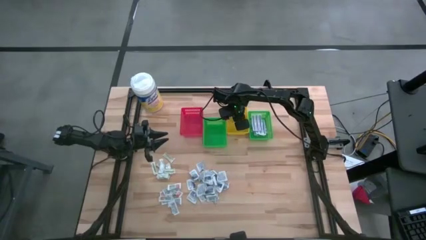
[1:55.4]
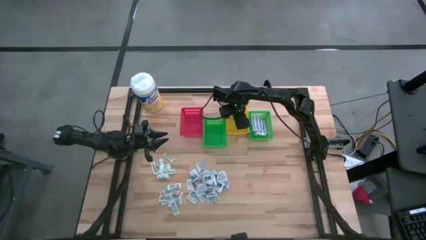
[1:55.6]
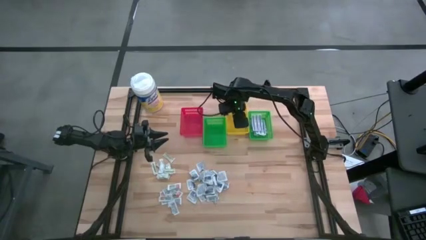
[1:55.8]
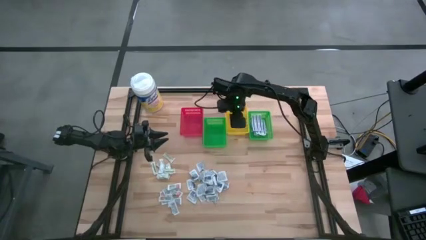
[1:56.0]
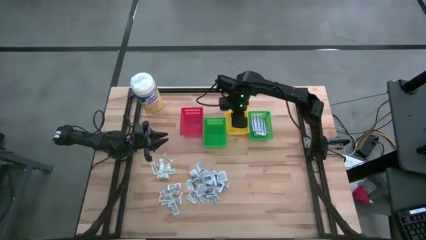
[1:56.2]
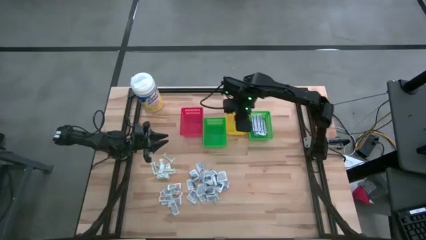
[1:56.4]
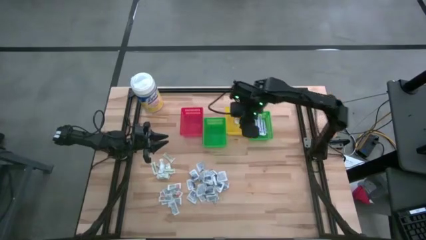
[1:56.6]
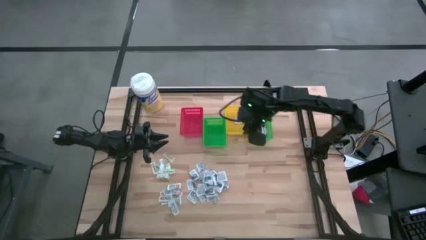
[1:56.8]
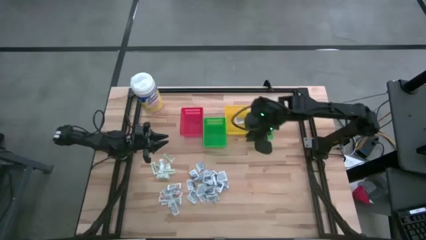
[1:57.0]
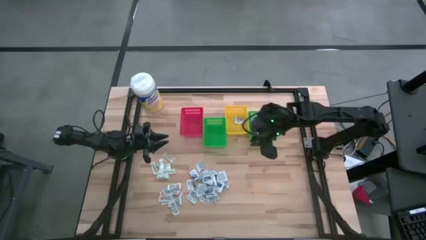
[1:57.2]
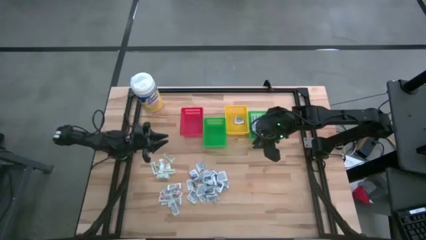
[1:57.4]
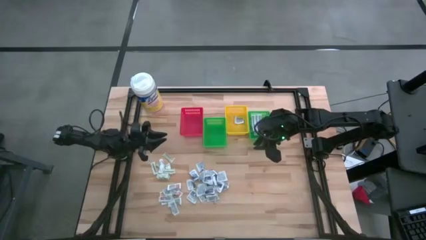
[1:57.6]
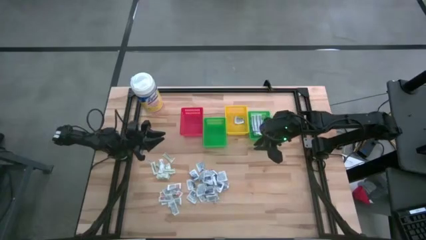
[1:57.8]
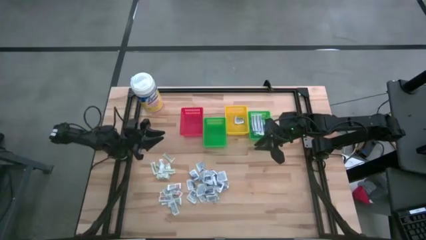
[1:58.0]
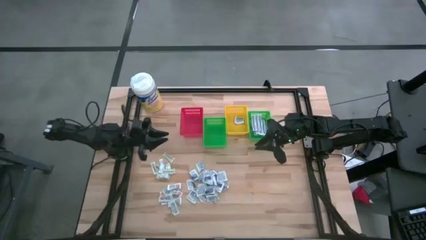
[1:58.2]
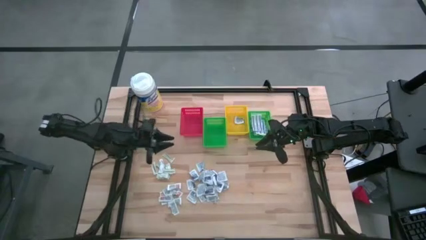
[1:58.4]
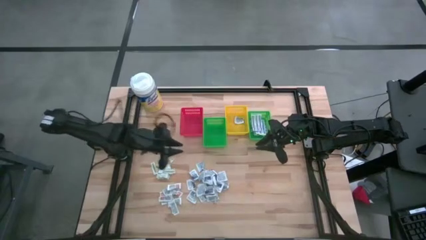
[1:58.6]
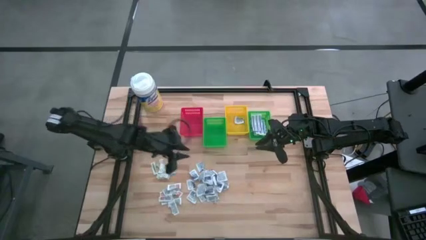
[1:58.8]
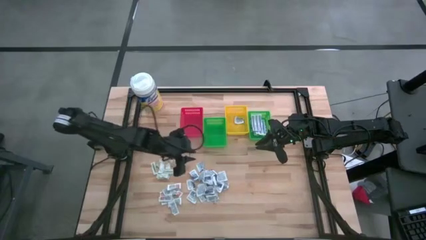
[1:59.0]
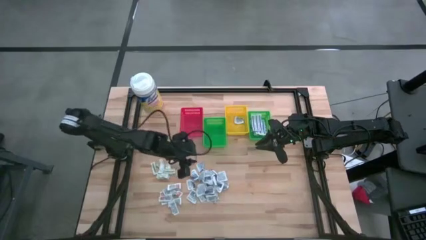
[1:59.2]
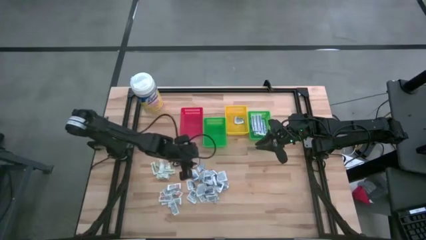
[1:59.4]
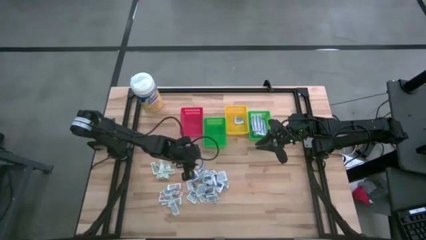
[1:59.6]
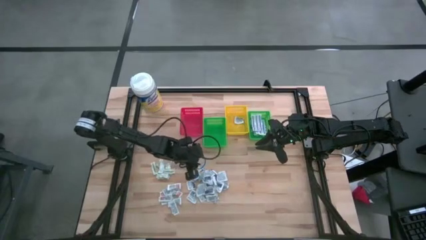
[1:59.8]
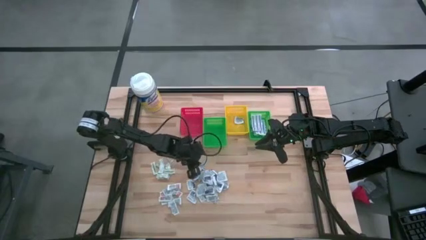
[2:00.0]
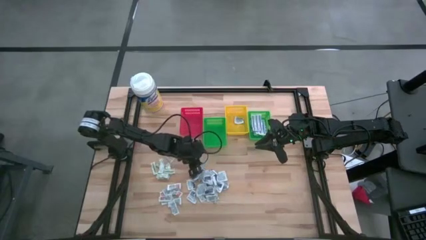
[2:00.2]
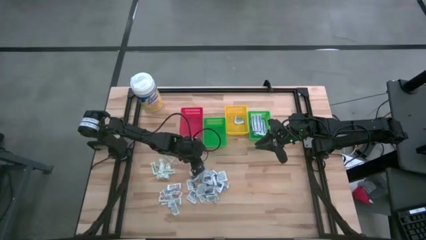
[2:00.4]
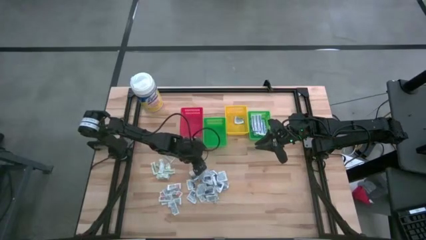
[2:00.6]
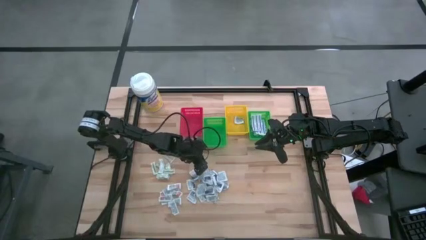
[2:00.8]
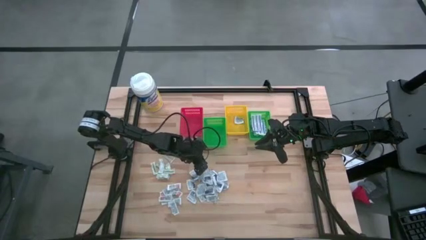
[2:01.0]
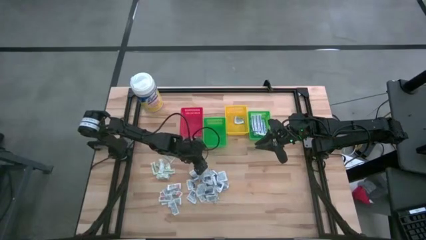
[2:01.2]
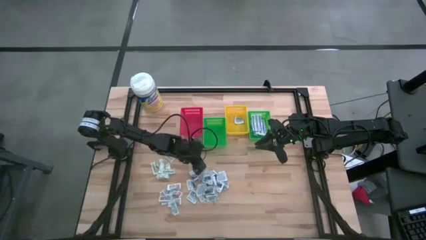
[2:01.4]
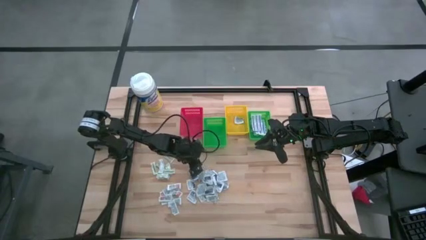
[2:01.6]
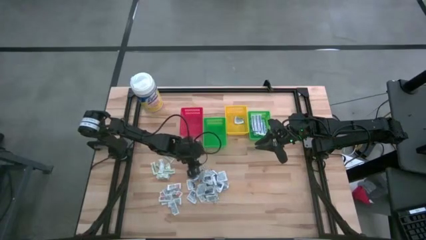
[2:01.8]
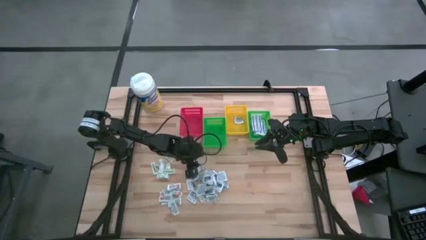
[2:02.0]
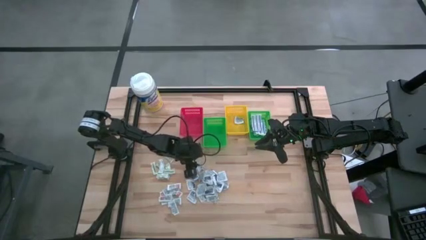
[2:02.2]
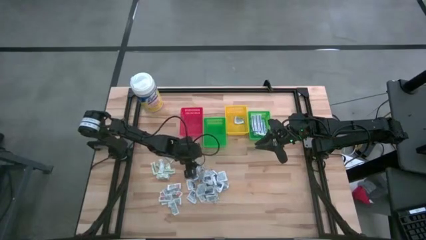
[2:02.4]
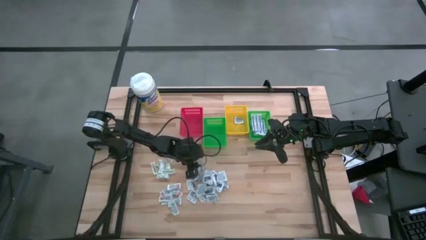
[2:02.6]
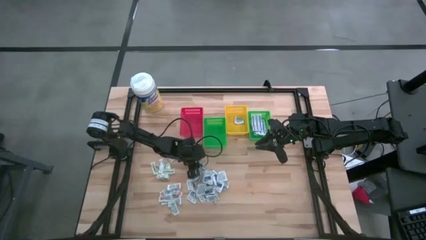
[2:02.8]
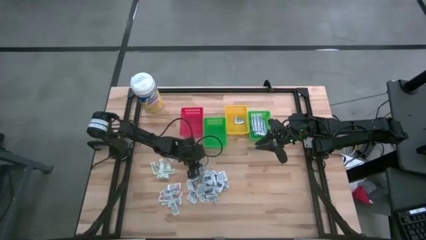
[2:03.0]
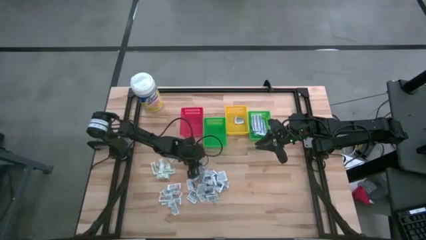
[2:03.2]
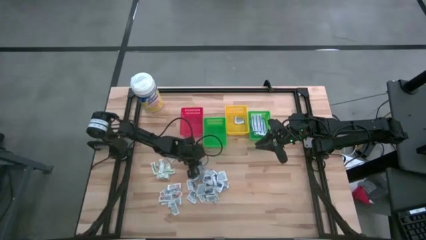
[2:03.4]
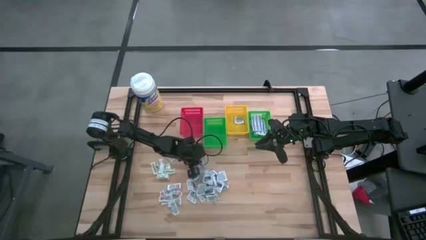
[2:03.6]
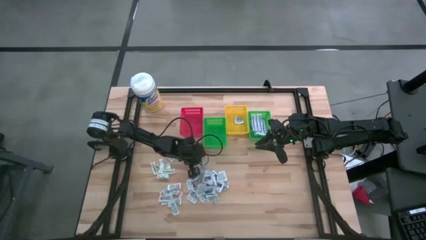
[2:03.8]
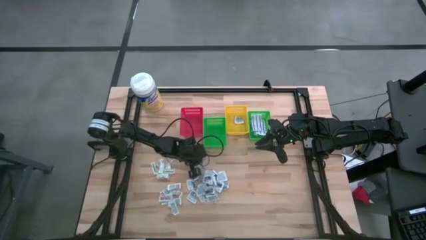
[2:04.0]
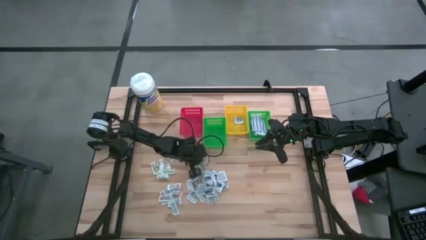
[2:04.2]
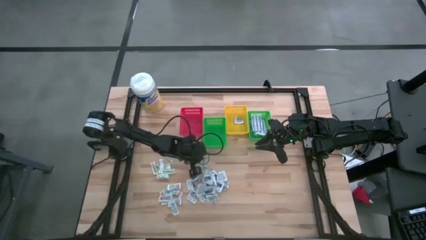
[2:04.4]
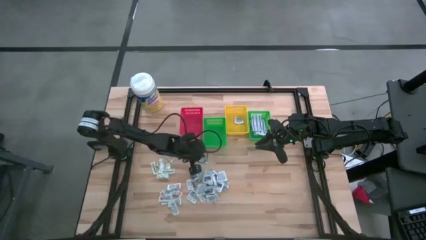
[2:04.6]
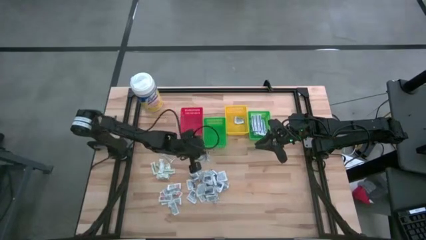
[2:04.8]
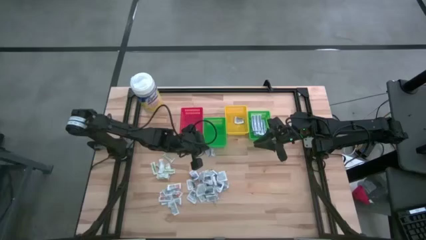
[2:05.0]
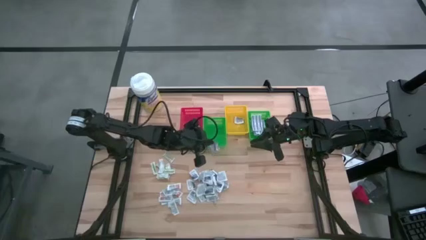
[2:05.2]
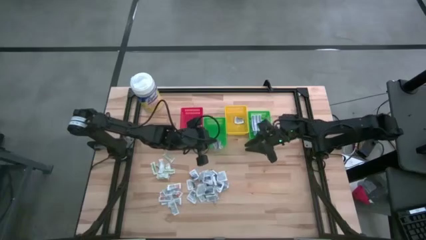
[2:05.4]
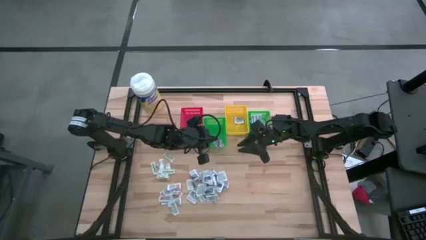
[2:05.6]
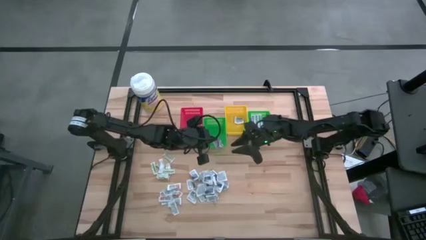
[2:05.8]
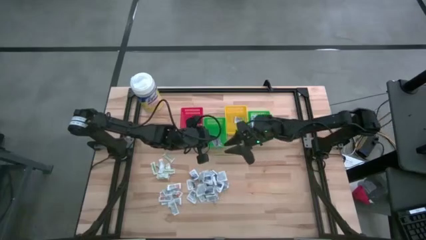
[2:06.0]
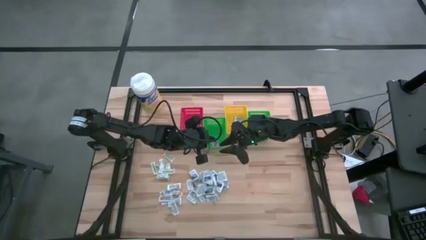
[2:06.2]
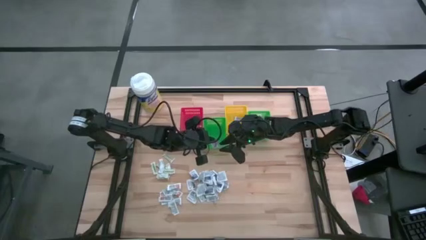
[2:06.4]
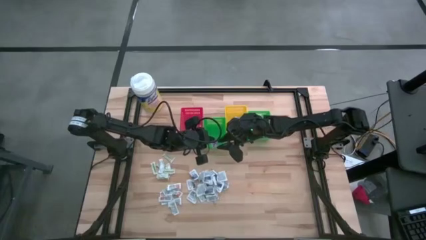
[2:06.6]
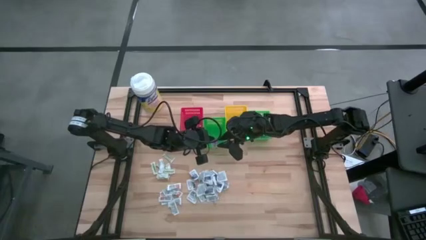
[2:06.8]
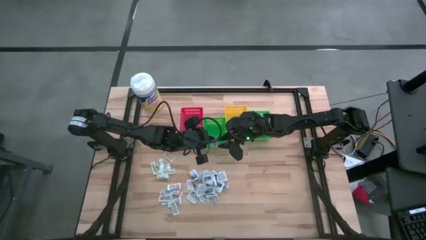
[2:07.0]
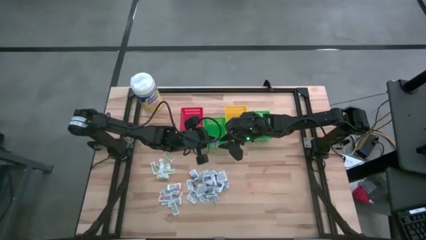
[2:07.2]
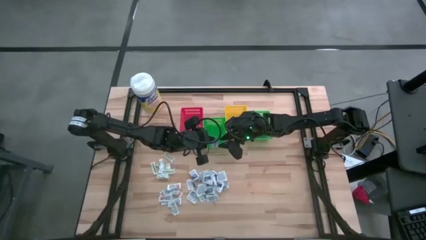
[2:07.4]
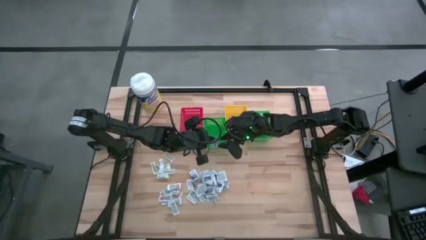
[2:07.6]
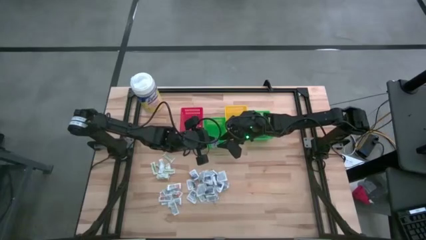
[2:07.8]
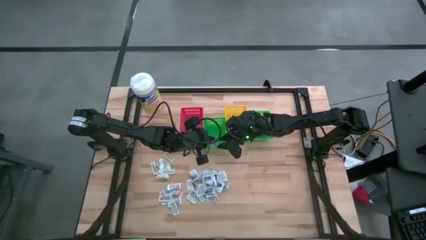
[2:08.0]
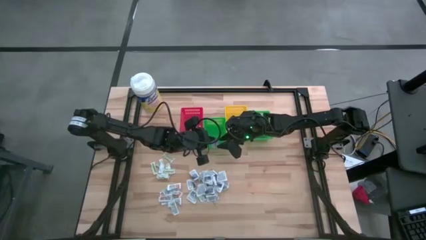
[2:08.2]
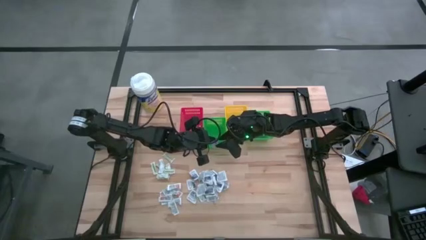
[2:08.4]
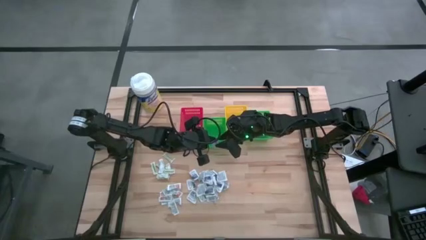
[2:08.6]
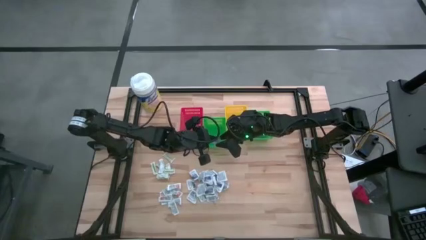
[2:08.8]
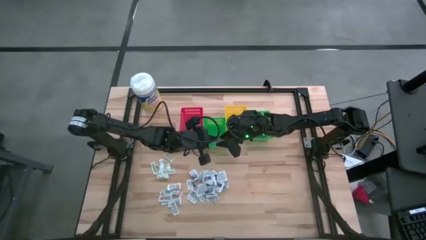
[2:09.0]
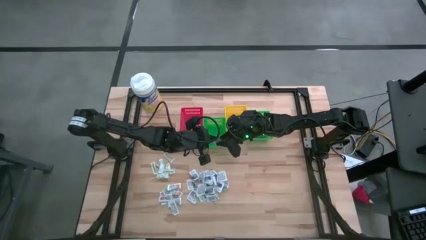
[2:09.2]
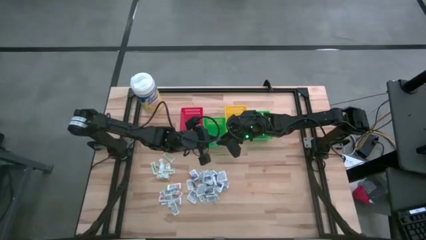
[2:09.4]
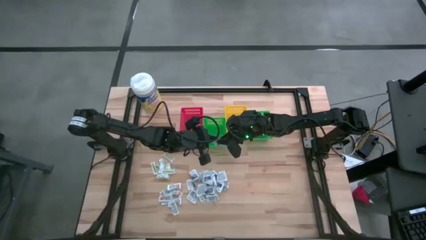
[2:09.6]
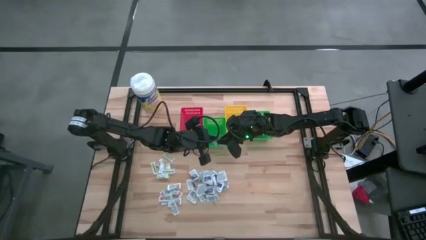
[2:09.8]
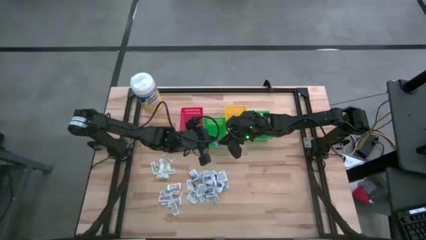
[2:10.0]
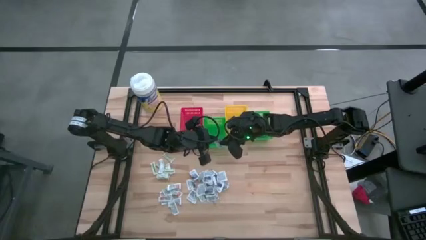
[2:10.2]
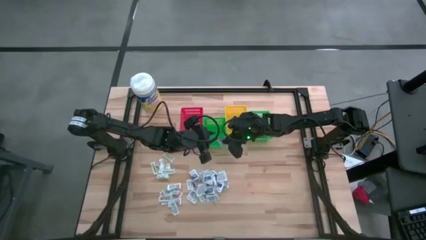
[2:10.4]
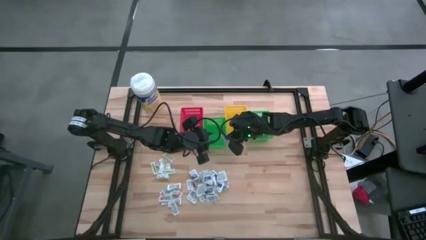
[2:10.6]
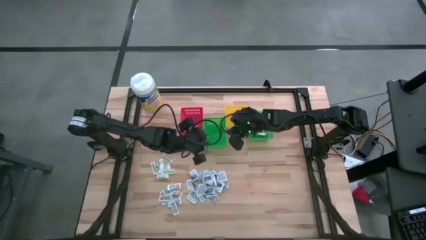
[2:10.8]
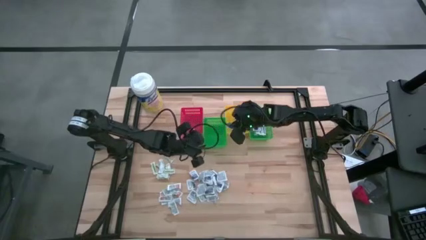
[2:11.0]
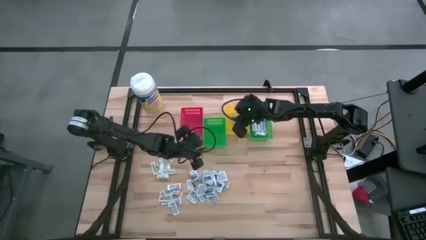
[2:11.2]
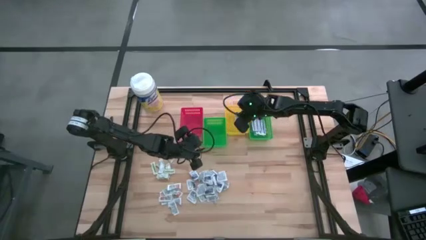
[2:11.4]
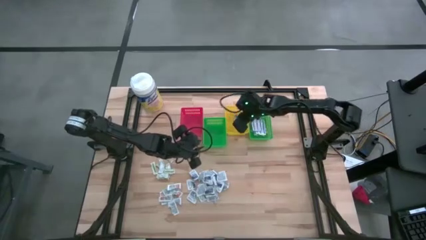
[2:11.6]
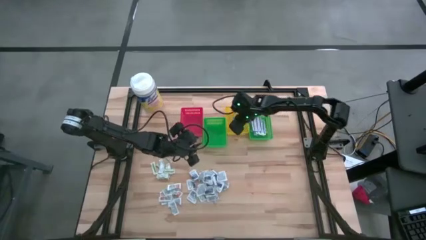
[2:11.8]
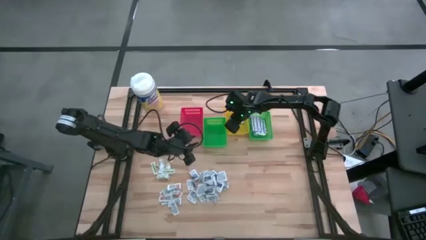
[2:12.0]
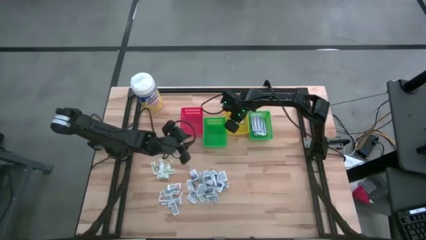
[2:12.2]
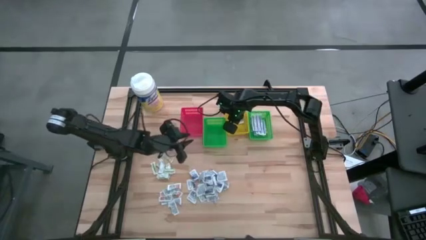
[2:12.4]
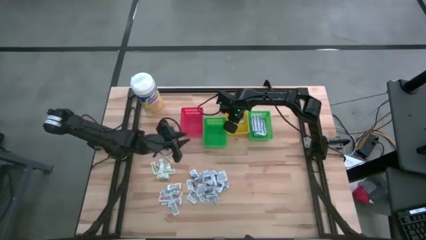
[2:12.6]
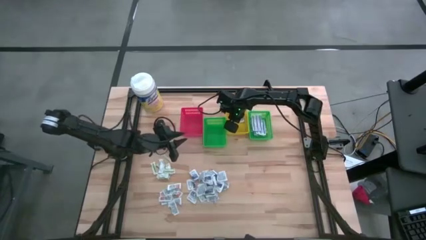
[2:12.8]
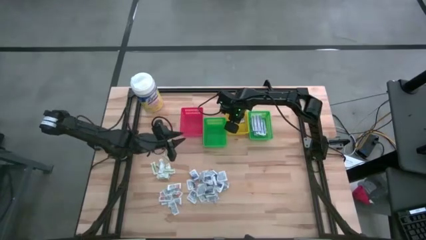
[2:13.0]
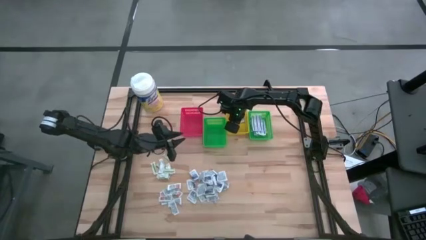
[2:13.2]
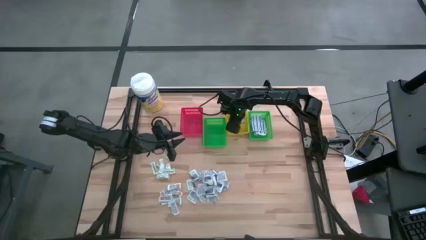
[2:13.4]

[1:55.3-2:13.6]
Task: Pick & Place First Aid Supplies
Put the alcohol pad into the yellow basket
